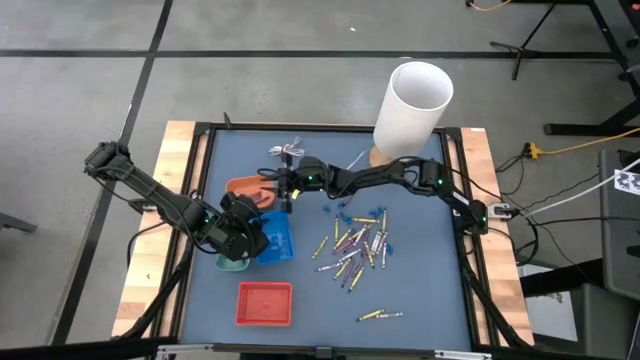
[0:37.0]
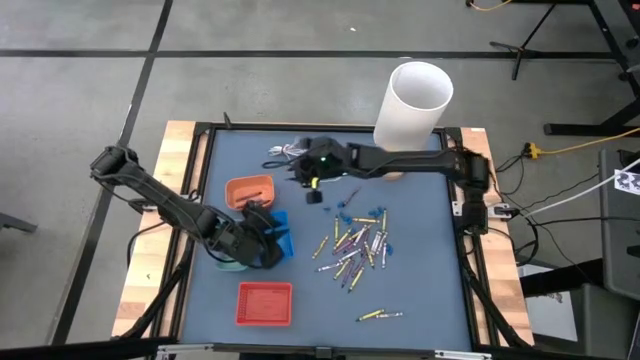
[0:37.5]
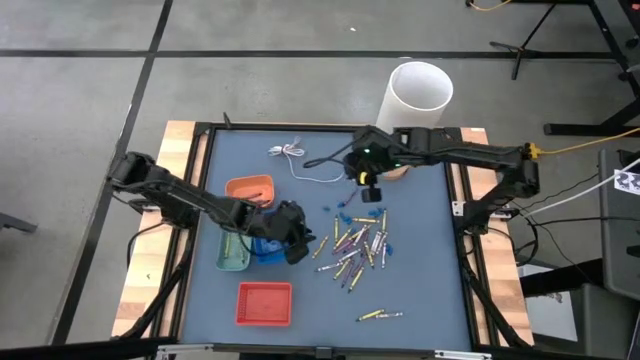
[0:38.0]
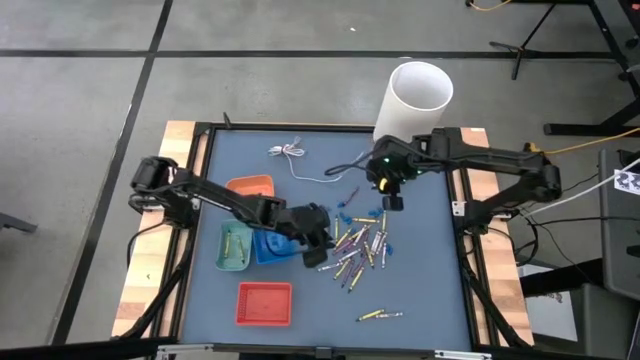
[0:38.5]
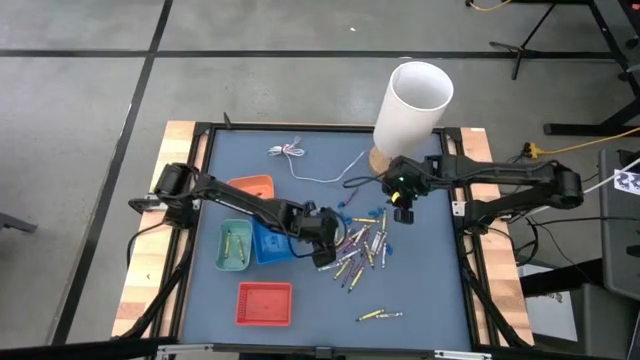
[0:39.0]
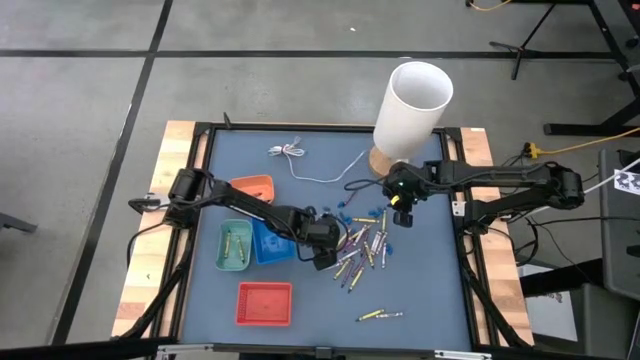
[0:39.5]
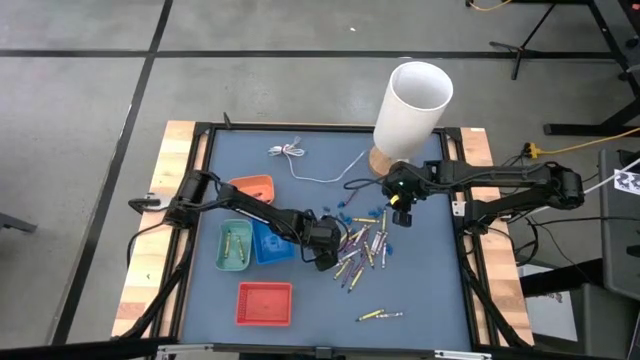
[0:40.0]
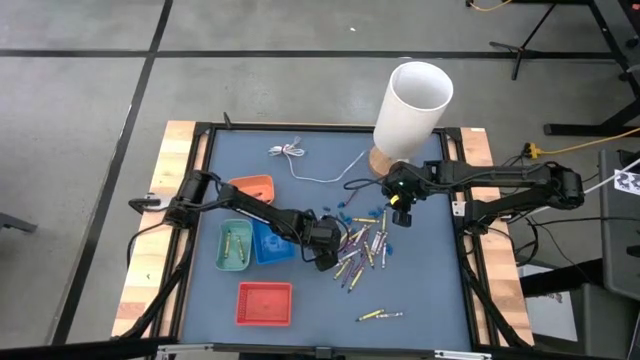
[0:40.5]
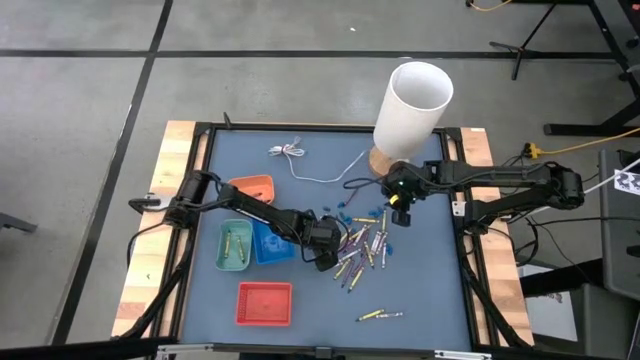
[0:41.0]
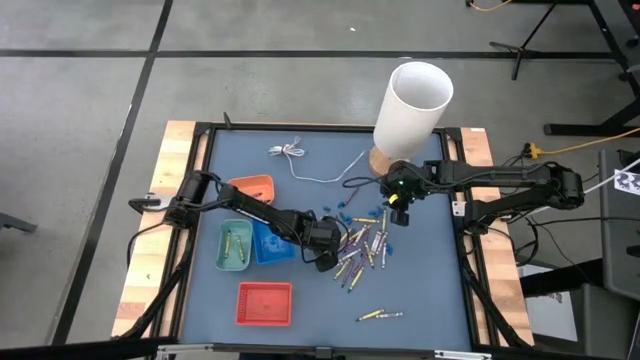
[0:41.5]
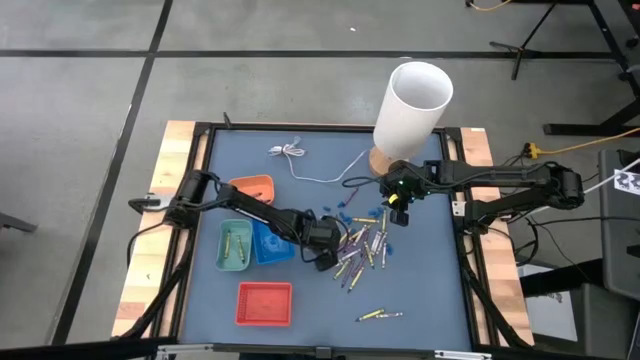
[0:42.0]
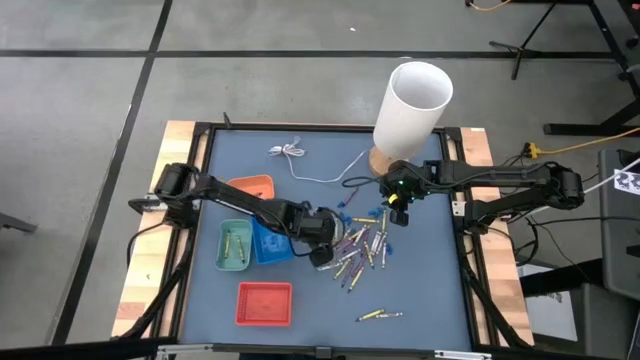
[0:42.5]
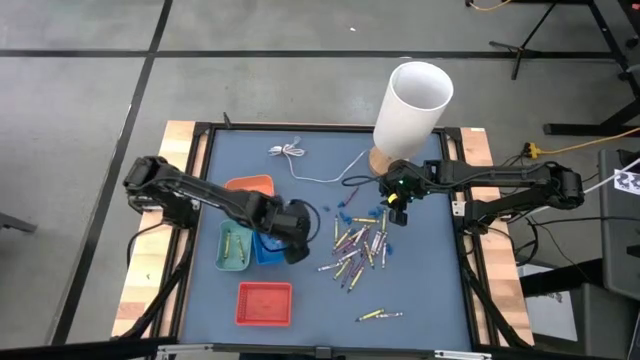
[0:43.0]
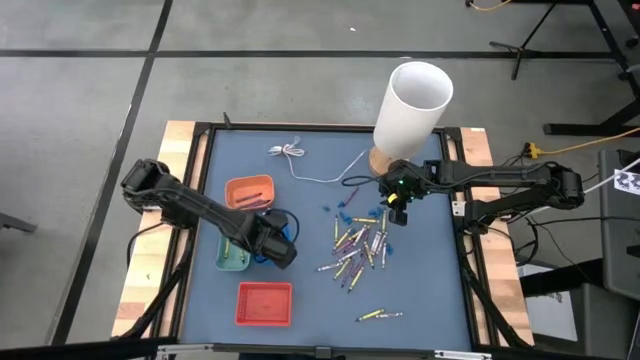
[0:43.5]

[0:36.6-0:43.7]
Task: Sort crayons
Put the yellow crayon into the blue basket

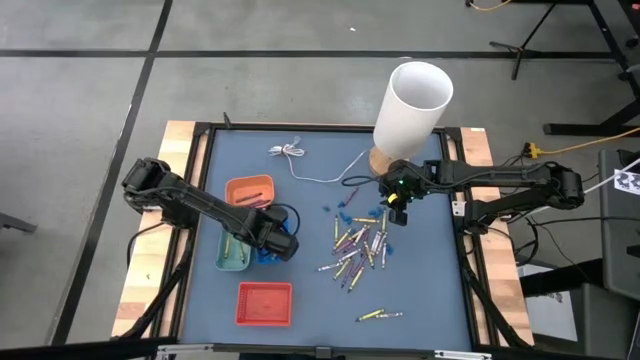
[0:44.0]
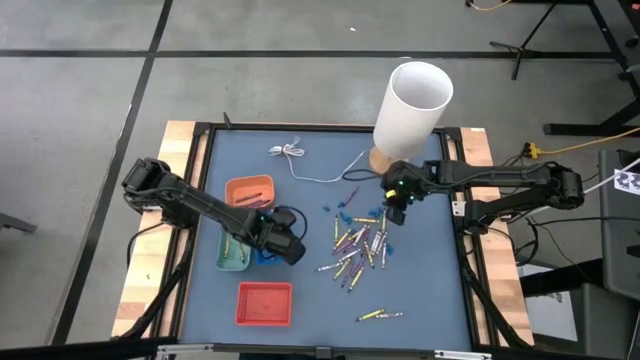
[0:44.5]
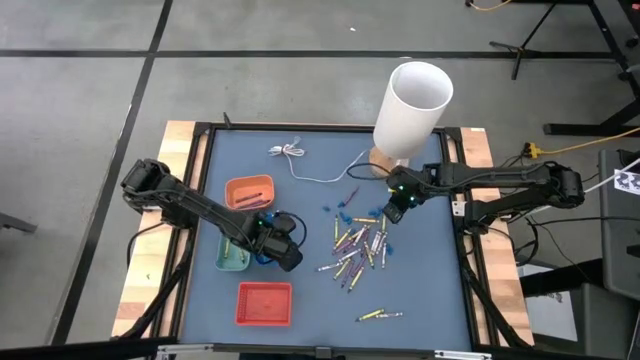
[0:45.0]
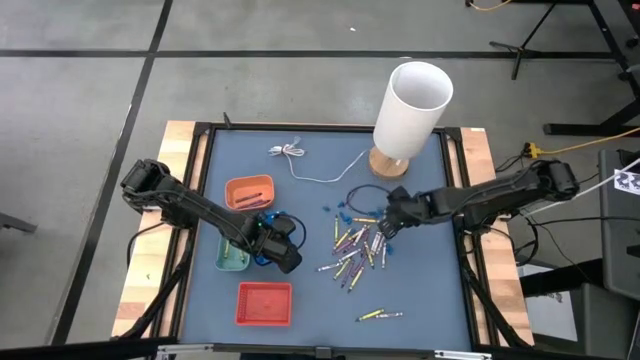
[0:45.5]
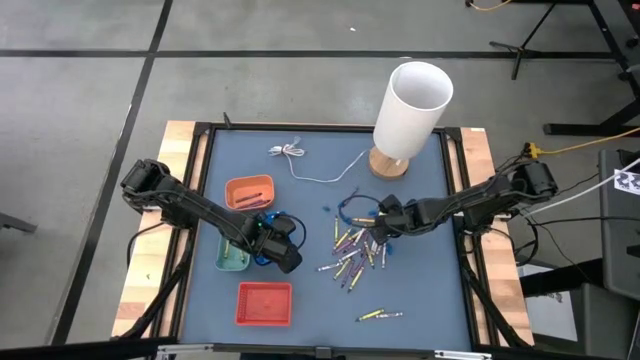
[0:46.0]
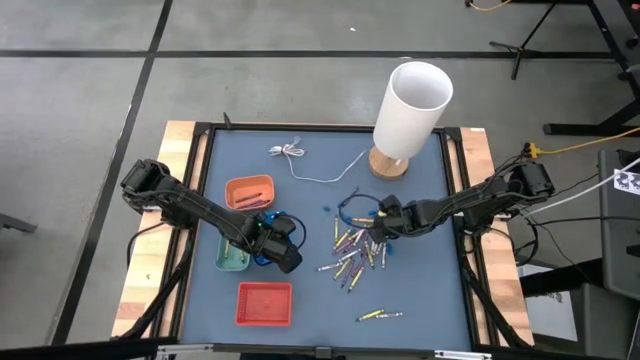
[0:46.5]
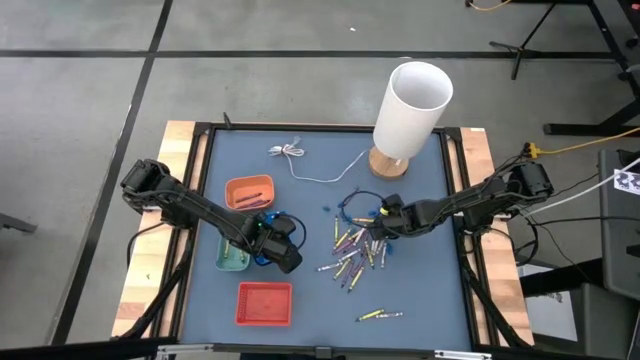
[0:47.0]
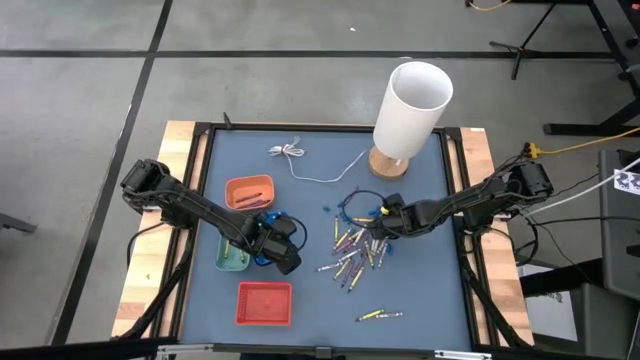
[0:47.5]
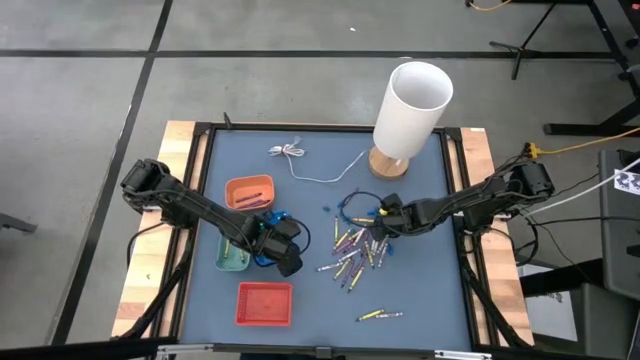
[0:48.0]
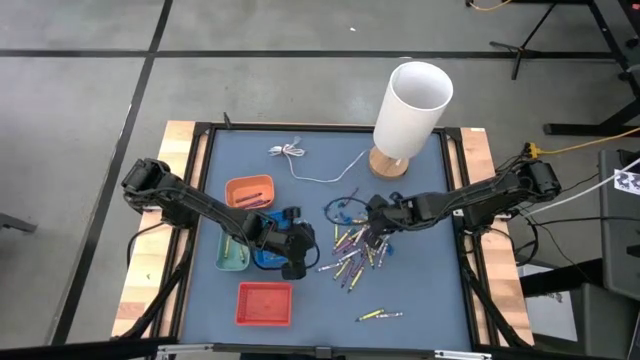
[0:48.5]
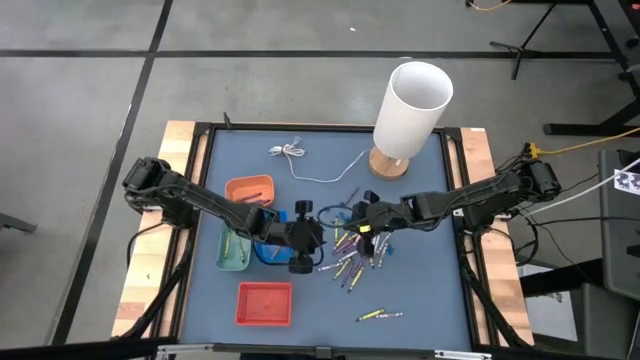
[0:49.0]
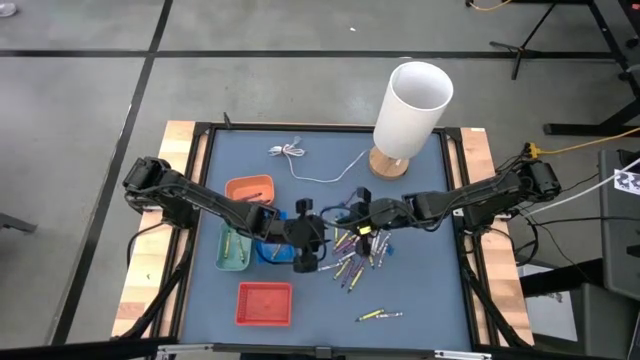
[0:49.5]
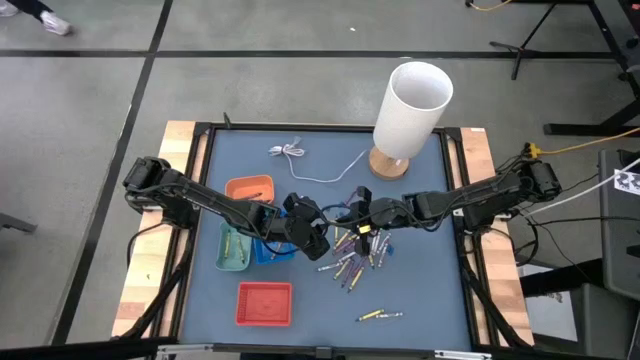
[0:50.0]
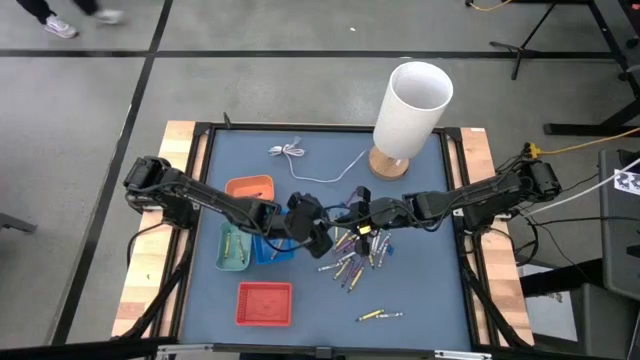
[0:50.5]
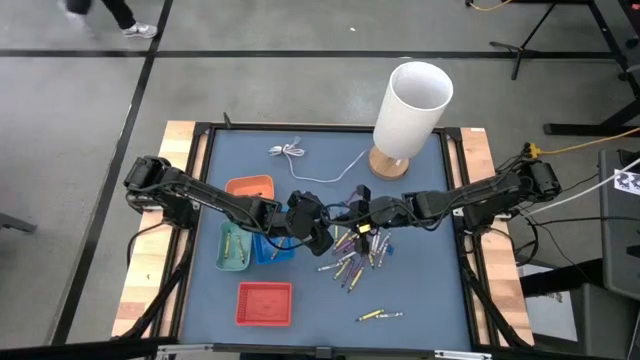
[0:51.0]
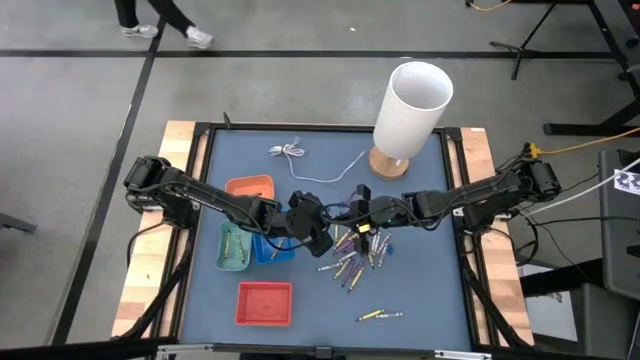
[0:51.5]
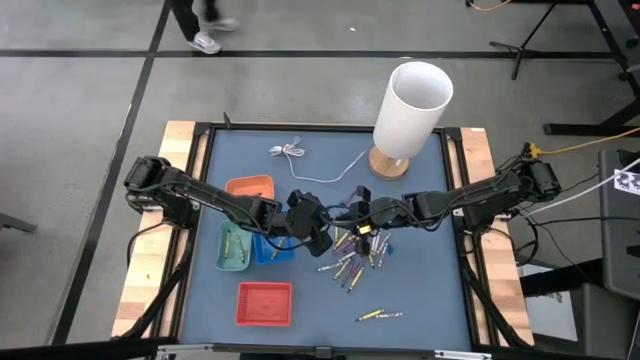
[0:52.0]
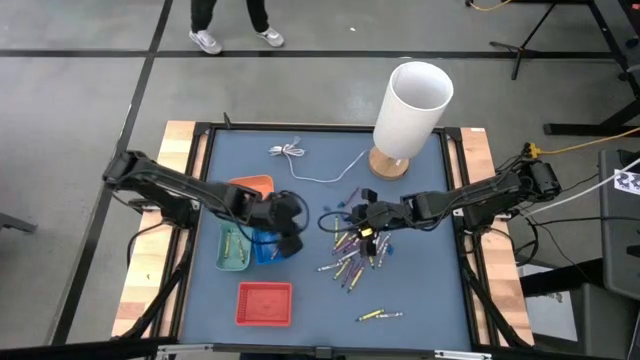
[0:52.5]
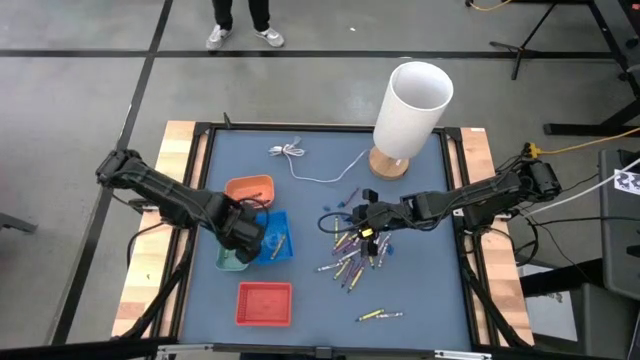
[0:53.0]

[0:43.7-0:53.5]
Put the green crayon into the blue green bin

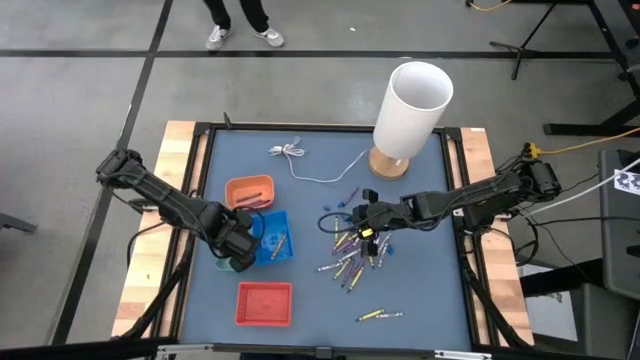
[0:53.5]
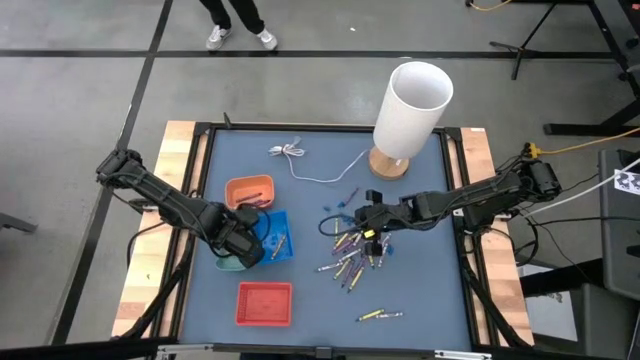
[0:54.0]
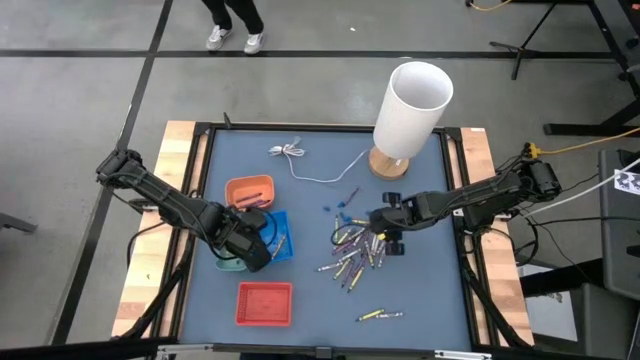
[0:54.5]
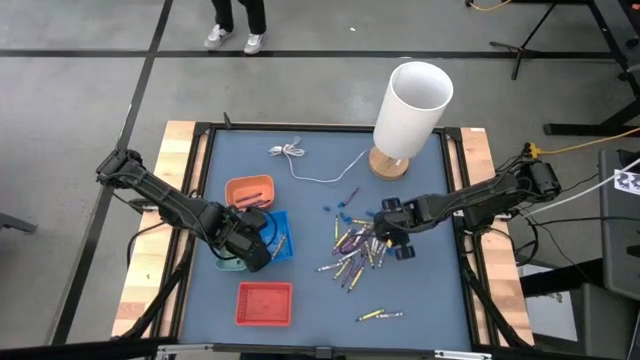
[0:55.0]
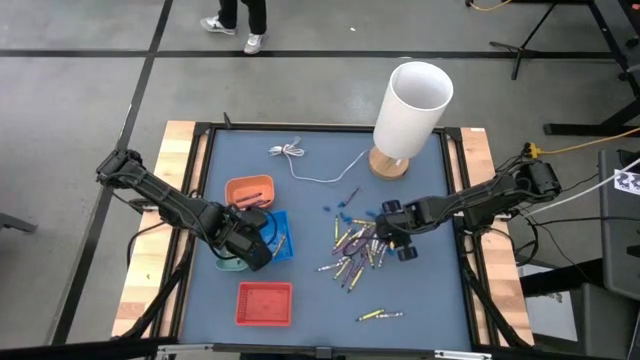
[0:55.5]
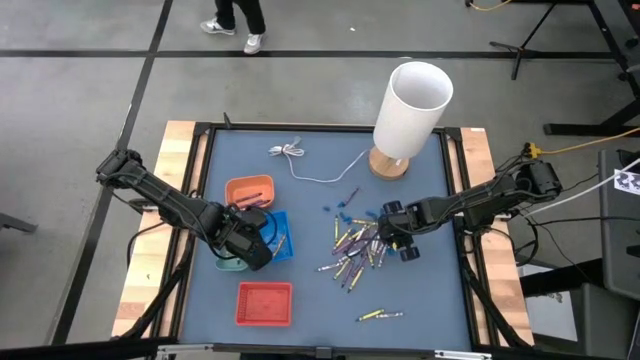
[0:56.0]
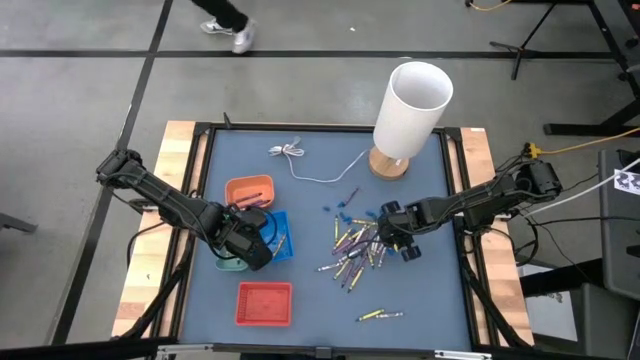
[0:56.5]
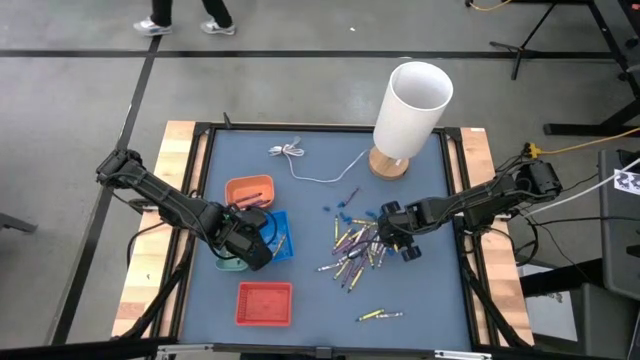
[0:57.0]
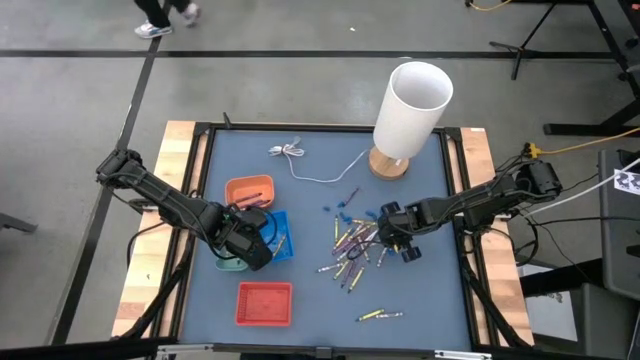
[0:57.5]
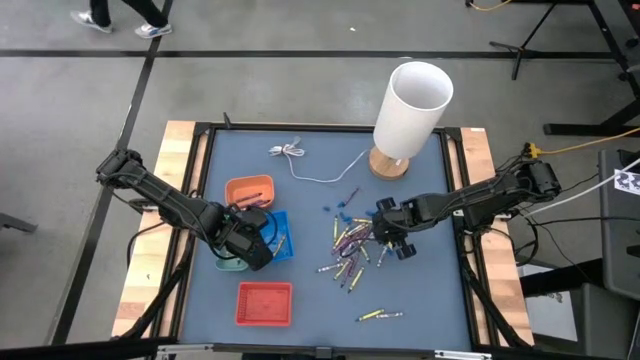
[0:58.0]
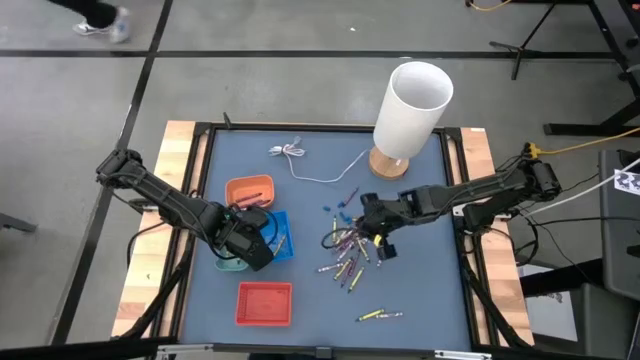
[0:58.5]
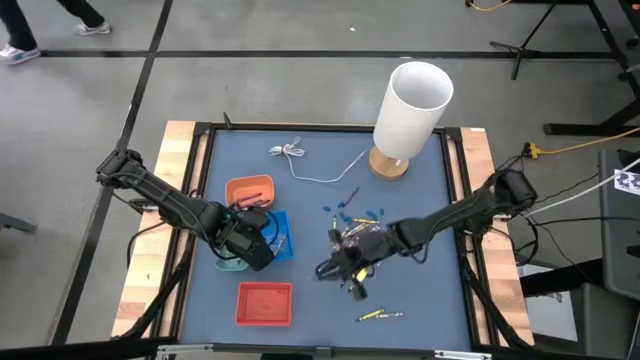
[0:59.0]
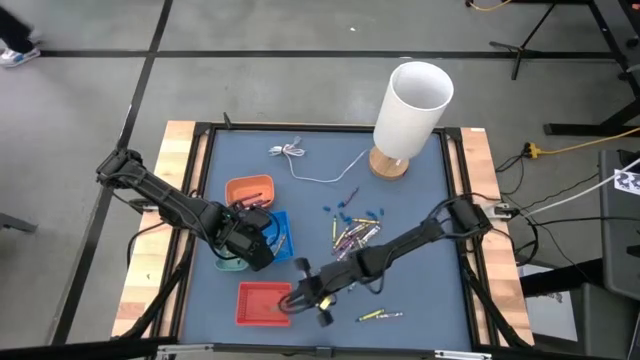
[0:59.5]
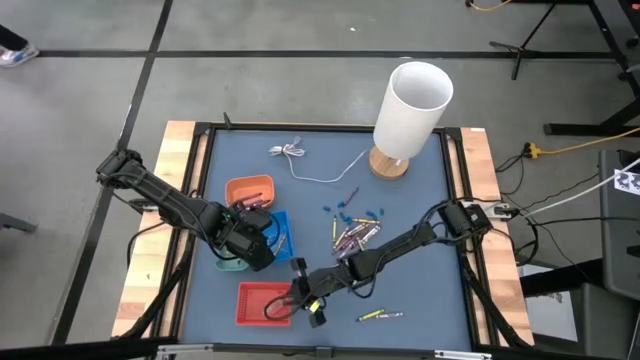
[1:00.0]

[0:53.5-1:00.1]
Put the gray crayon into the orange basket
